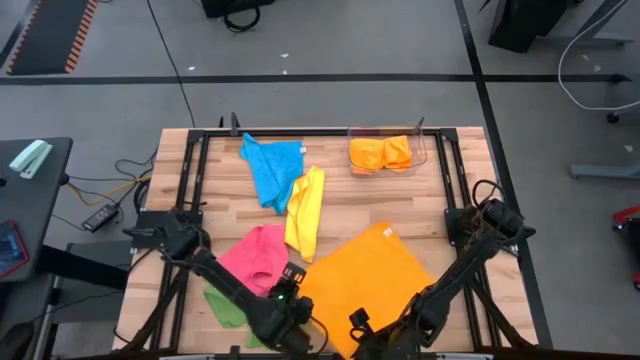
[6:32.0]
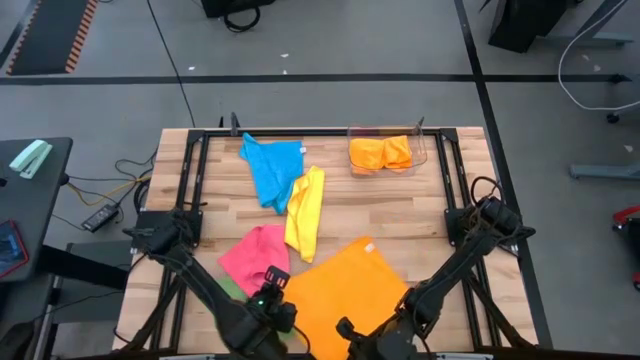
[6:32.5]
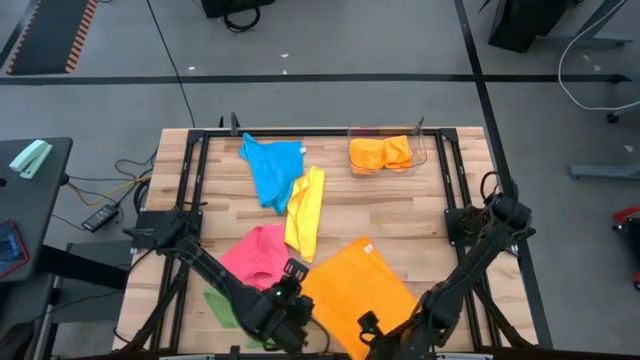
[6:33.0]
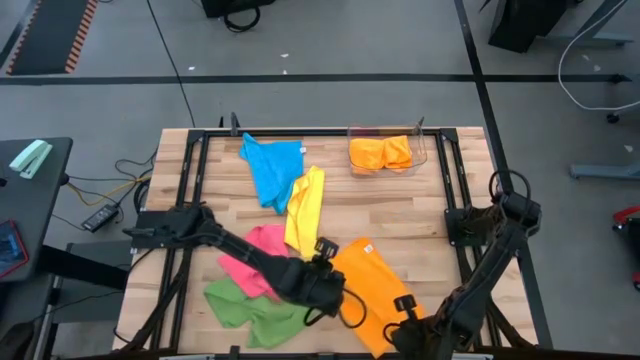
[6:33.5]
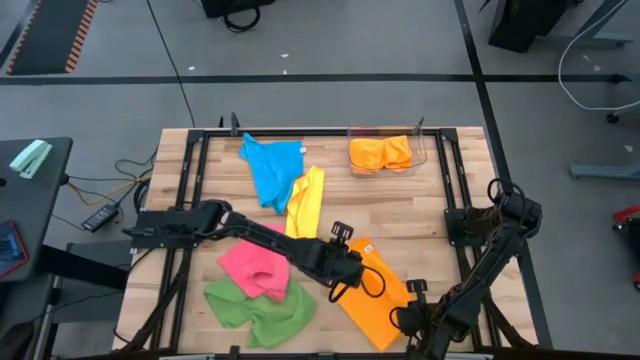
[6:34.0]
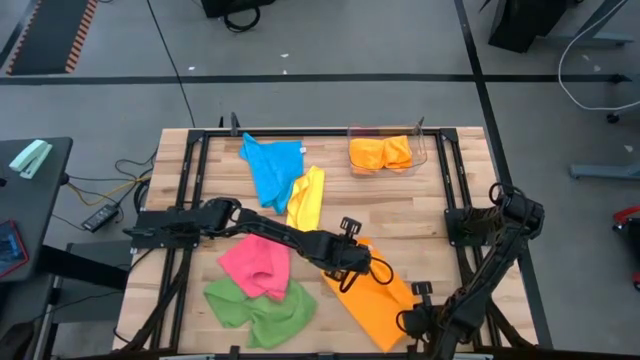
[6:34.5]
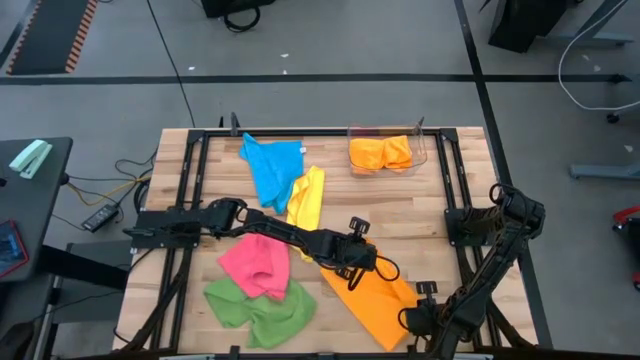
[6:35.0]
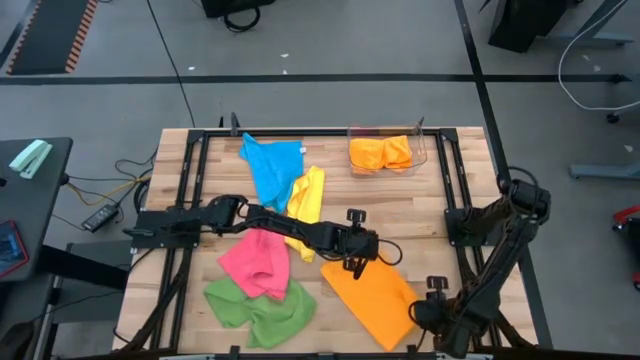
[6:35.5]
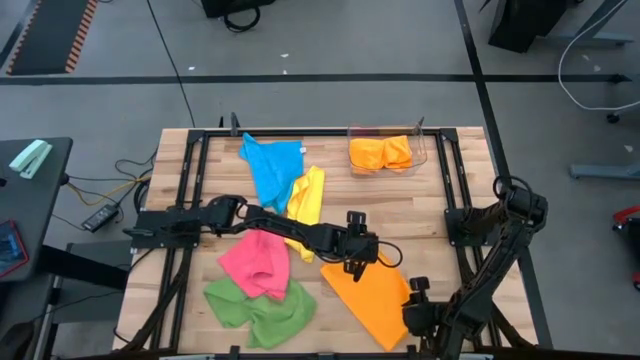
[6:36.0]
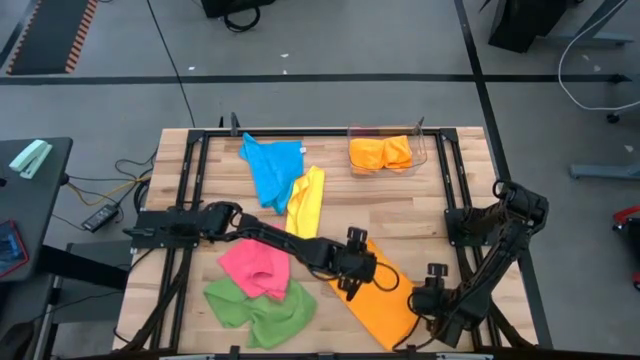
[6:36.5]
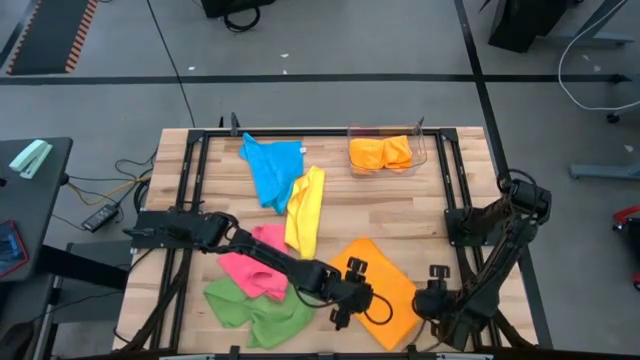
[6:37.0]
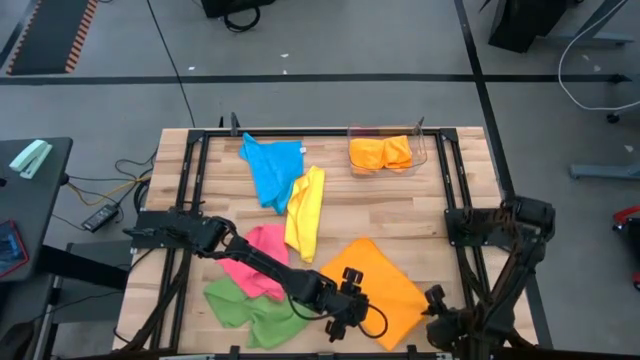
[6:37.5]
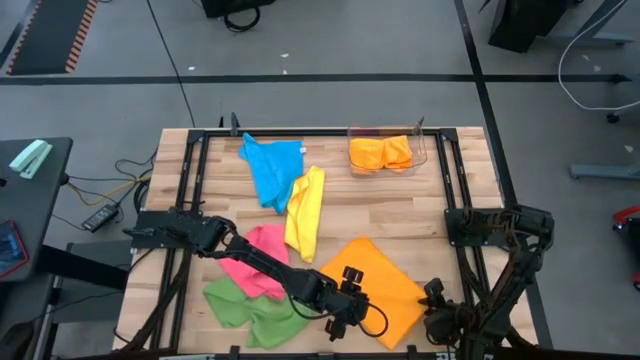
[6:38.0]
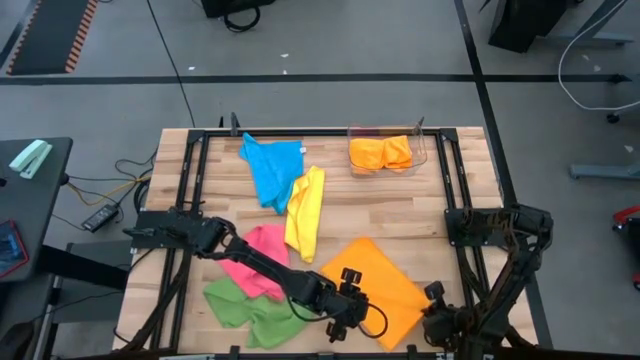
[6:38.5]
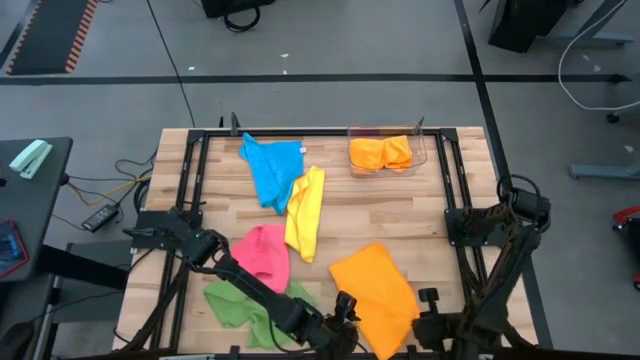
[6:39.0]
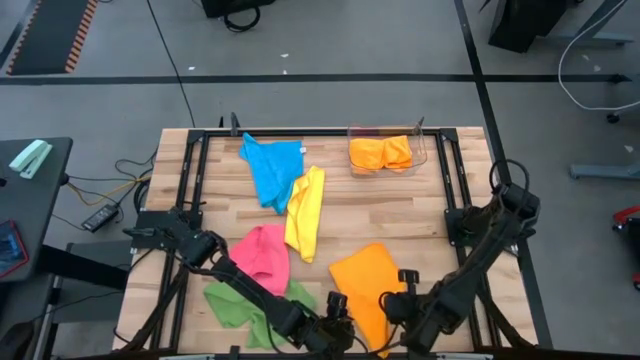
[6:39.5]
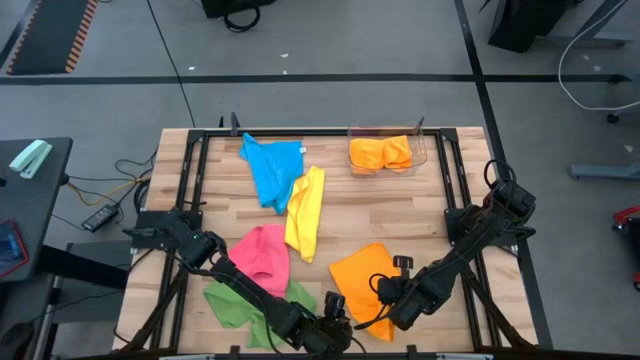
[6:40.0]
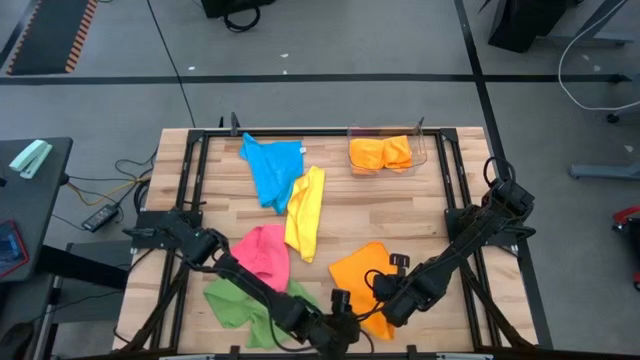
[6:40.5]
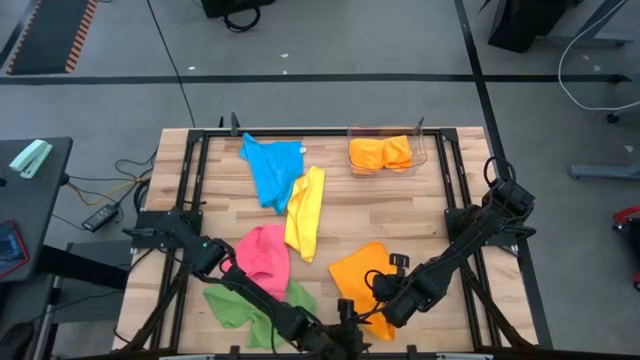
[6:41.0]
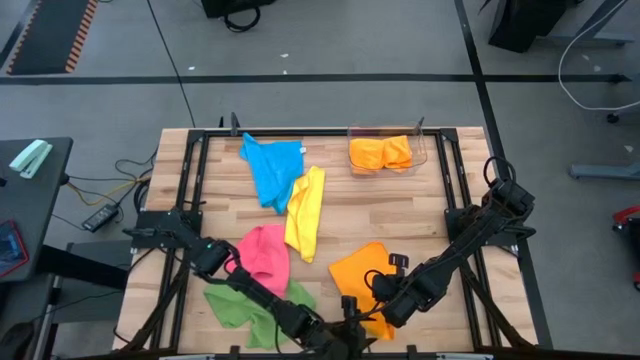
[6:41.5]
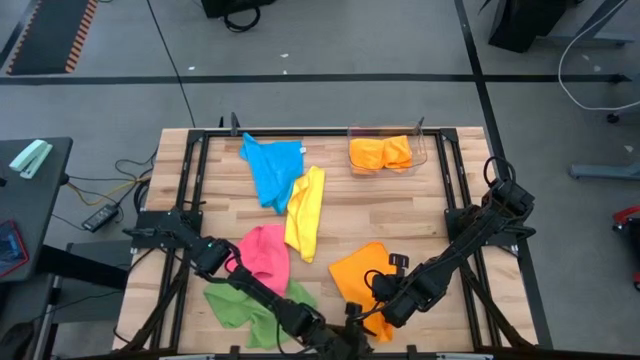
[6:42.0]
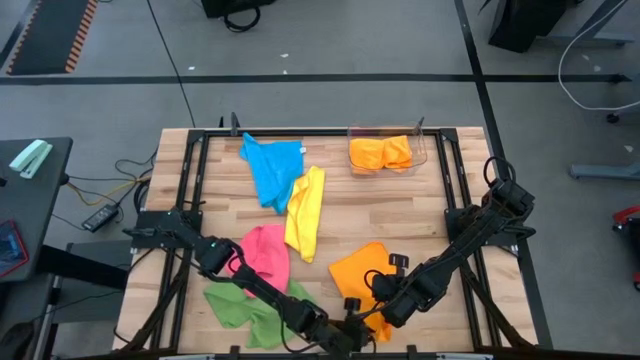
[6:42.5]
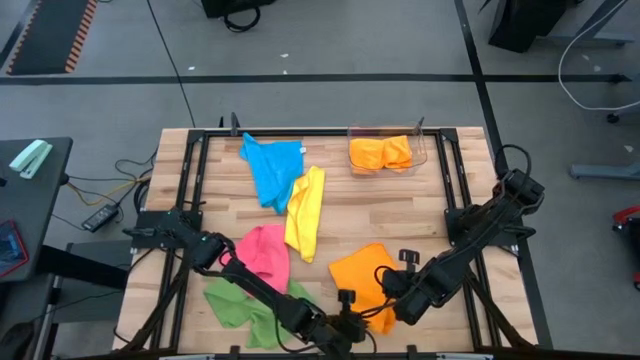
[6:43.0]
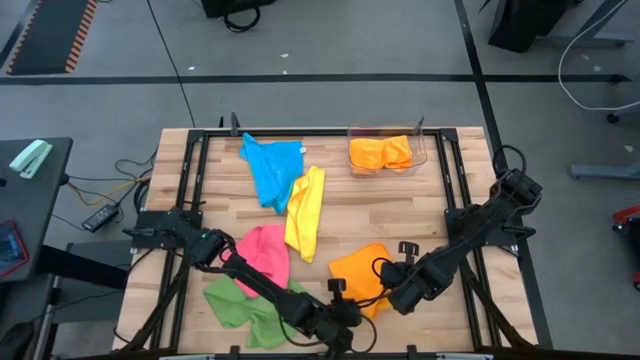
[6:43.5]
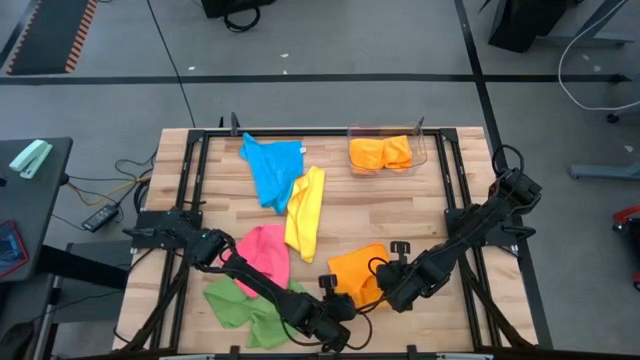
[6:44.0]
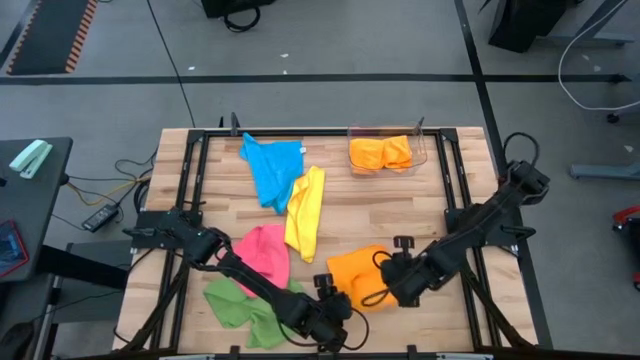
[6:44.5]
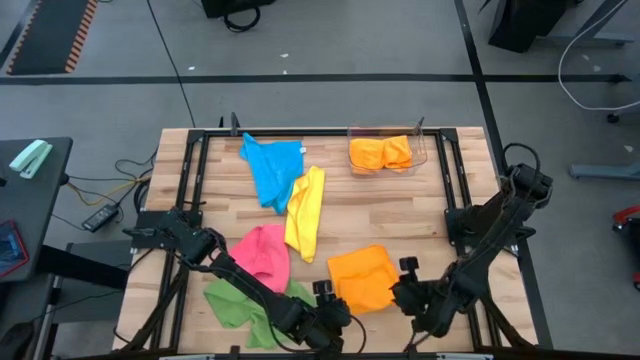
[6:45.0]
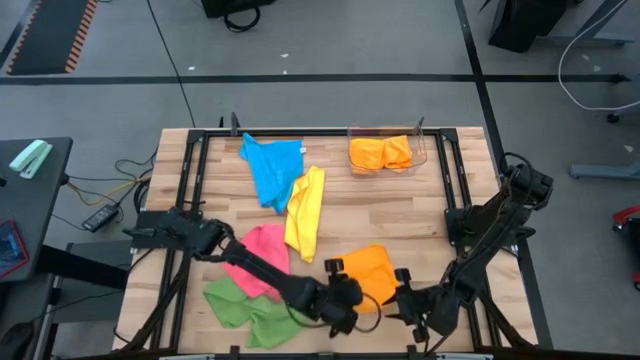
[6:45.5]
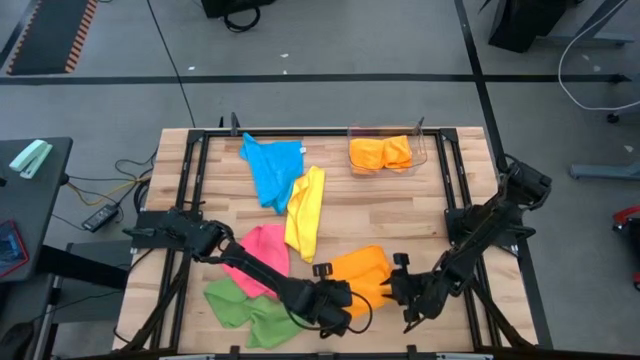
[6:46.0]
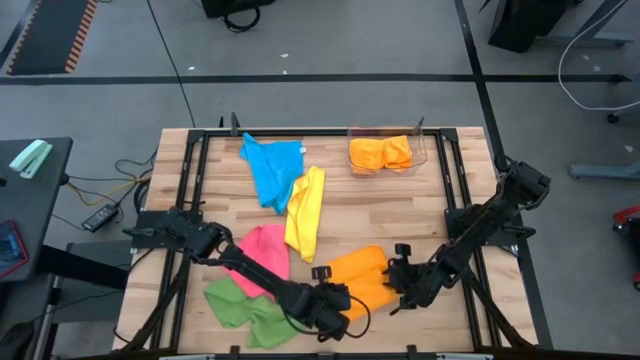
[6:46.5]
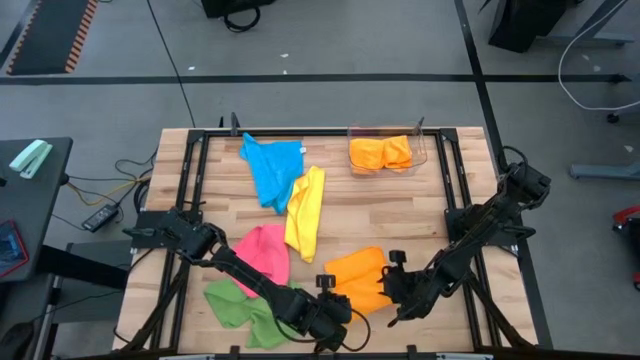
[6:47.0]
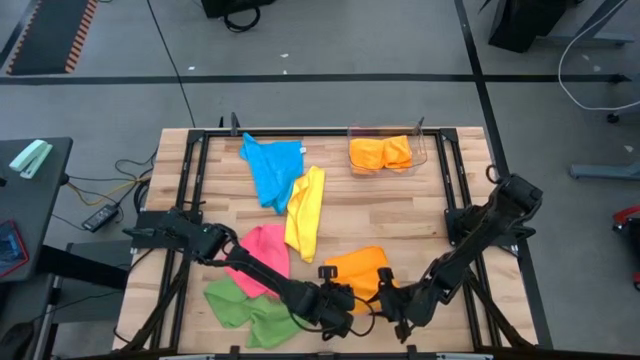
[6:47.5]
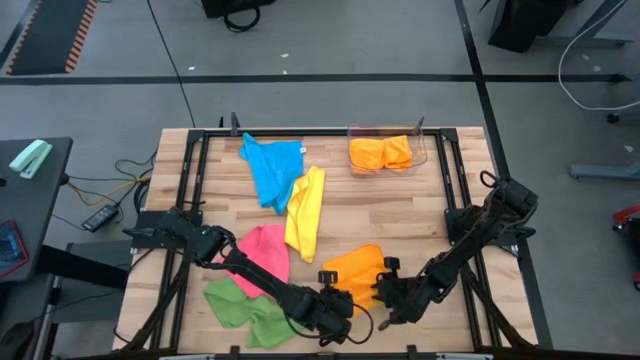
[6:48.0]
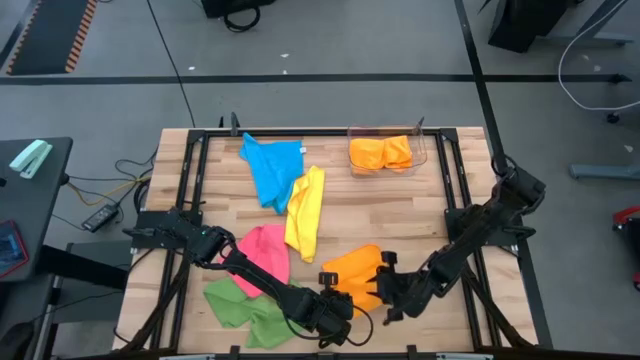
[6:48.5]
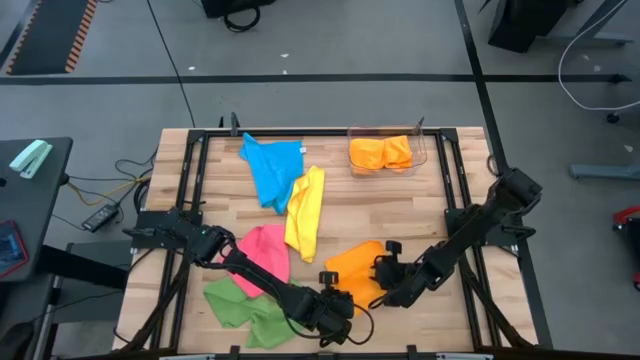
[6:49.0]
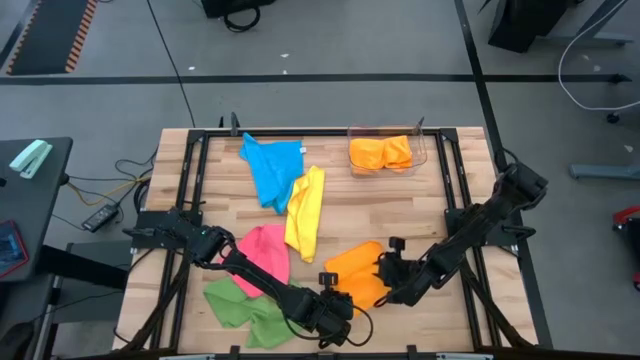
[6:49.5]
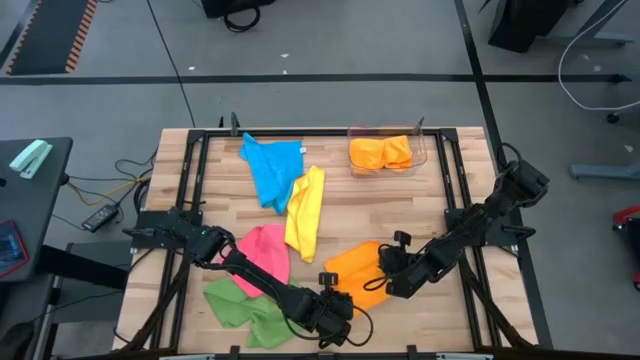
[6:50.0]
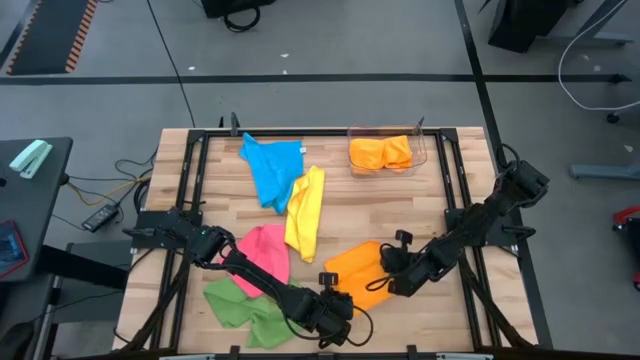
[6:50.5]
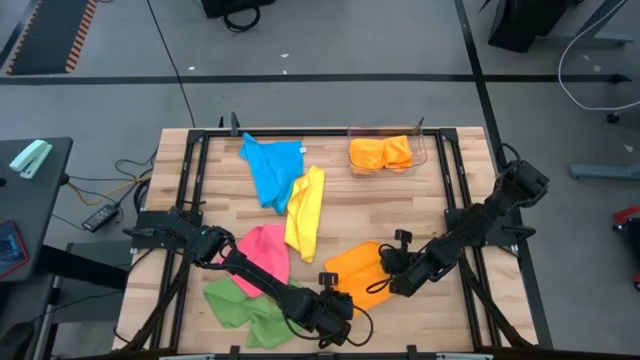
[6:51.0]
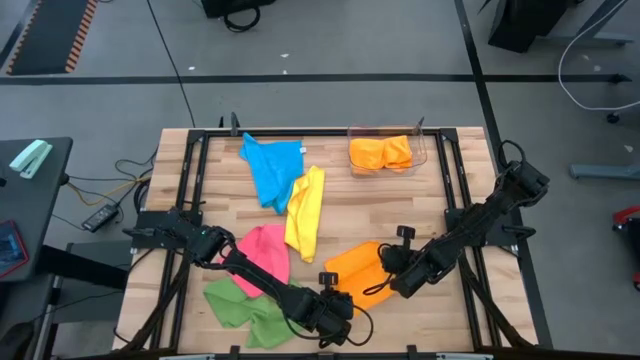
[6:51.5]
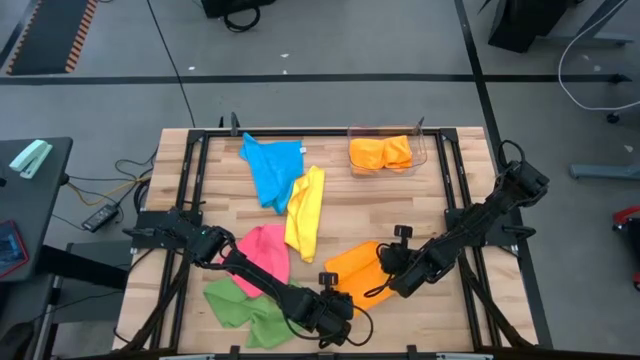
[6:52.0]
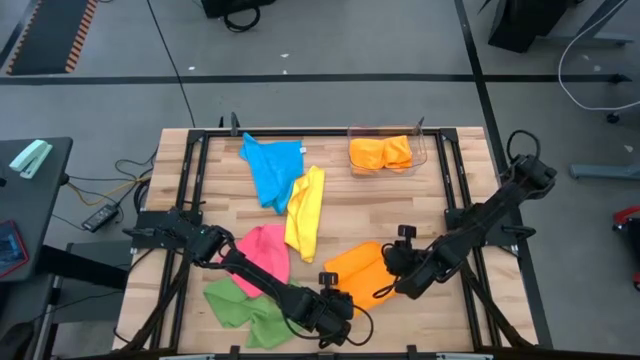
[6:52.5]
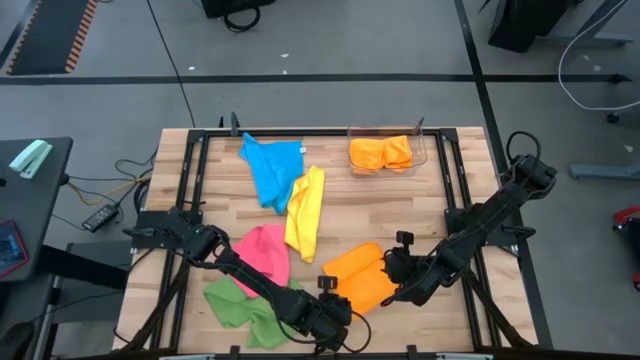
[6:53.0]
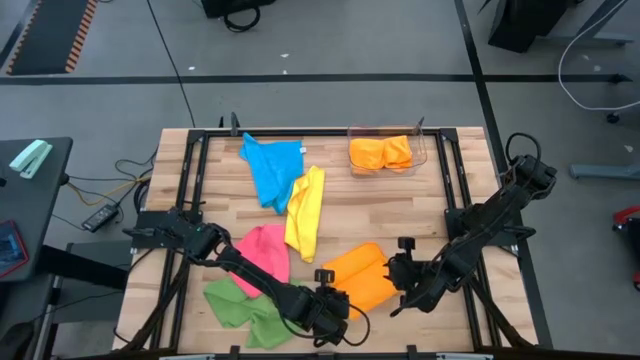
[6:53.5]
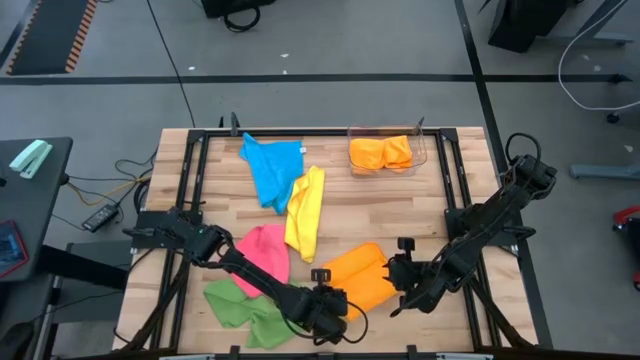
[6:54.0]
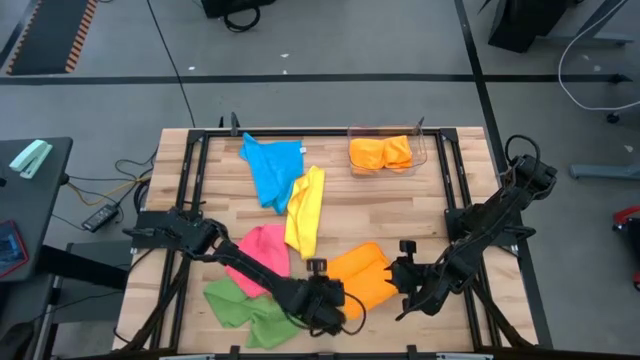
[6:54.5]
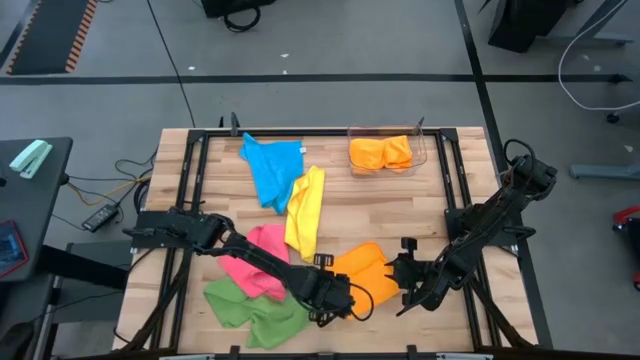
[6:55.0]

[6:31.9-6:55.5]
Task: Fold microfiber towels
Fold the orange microfiber cloth
